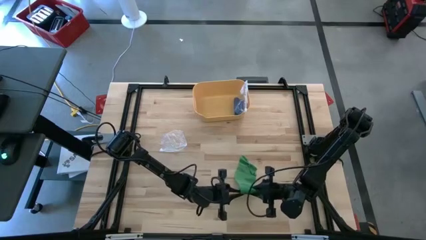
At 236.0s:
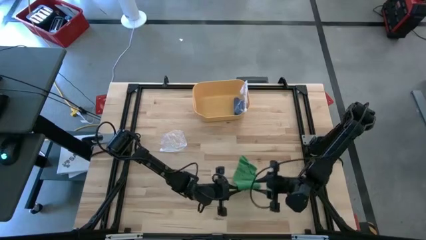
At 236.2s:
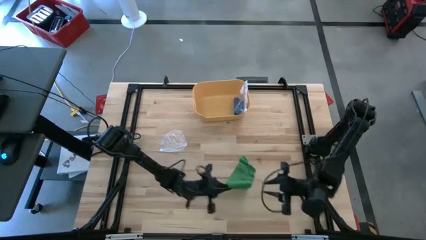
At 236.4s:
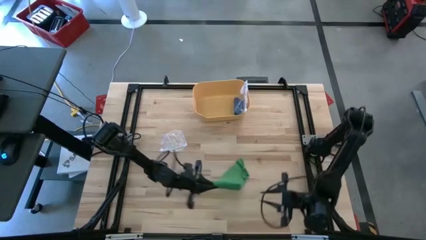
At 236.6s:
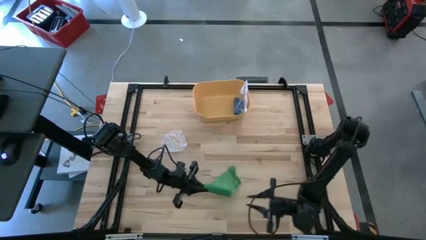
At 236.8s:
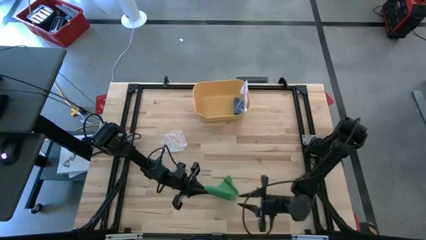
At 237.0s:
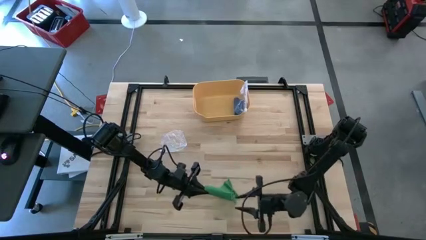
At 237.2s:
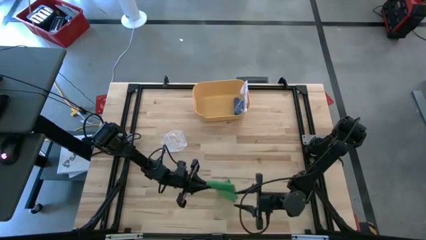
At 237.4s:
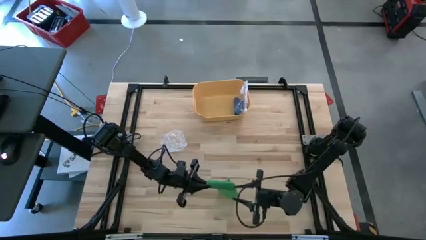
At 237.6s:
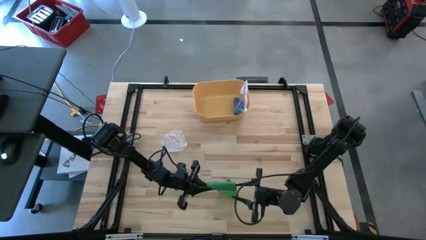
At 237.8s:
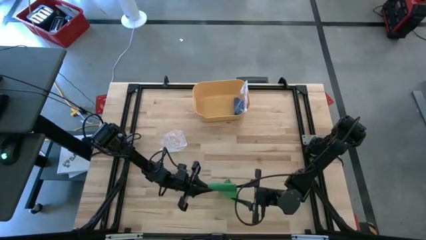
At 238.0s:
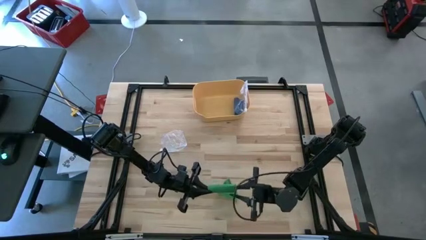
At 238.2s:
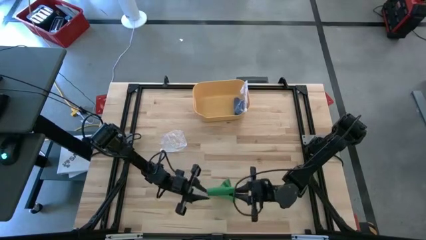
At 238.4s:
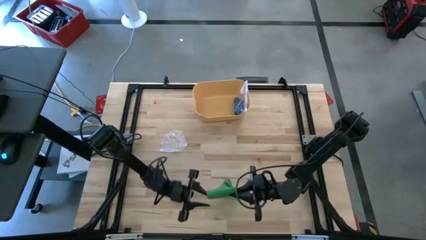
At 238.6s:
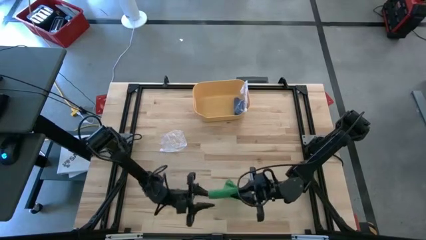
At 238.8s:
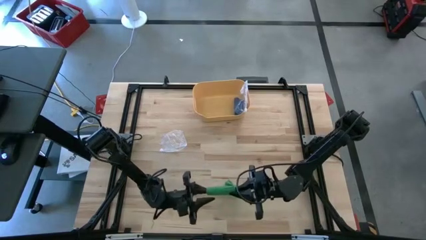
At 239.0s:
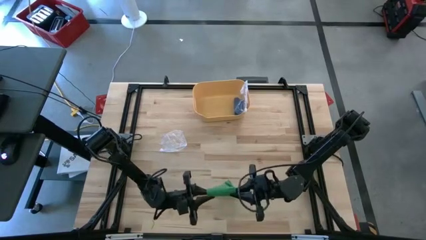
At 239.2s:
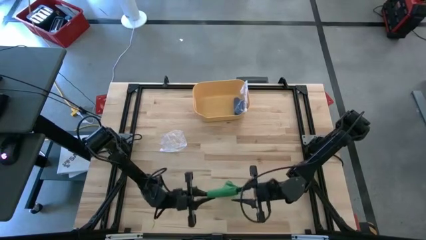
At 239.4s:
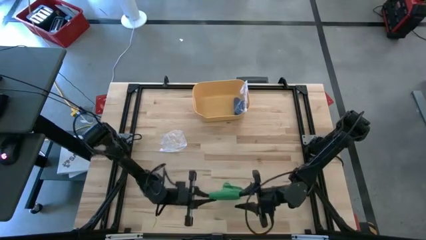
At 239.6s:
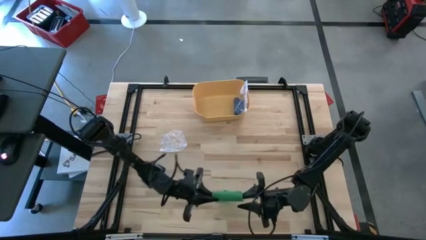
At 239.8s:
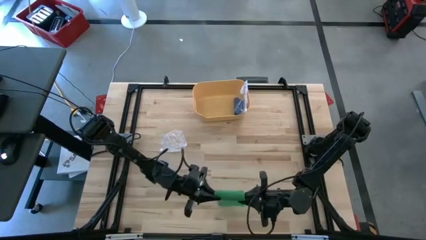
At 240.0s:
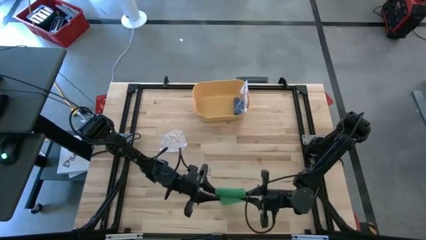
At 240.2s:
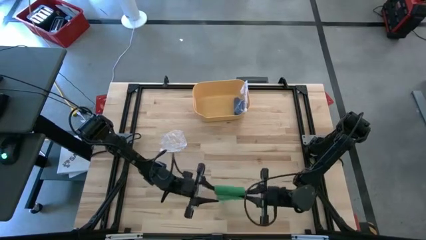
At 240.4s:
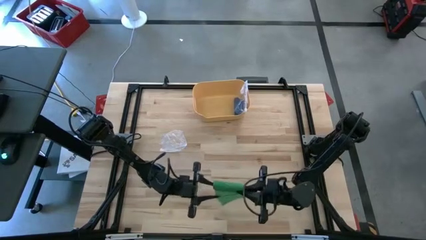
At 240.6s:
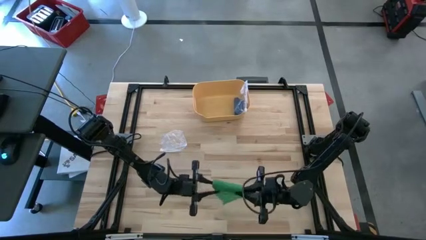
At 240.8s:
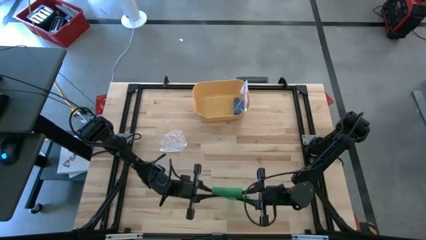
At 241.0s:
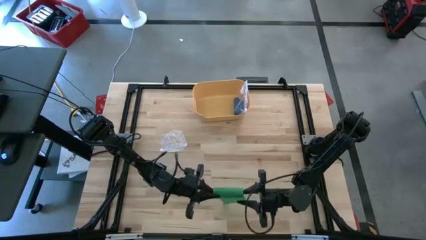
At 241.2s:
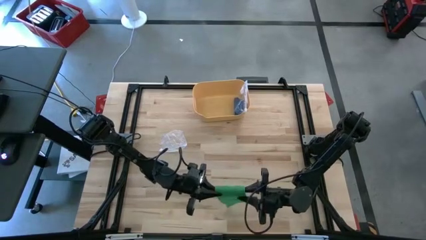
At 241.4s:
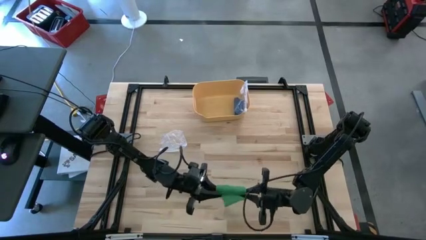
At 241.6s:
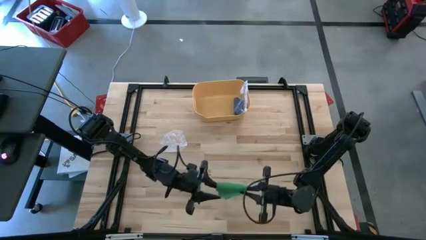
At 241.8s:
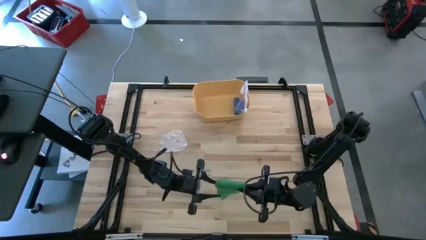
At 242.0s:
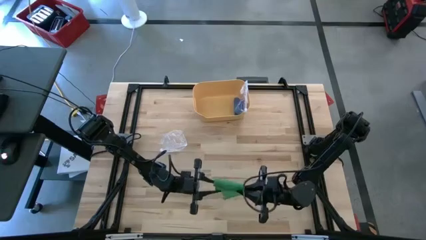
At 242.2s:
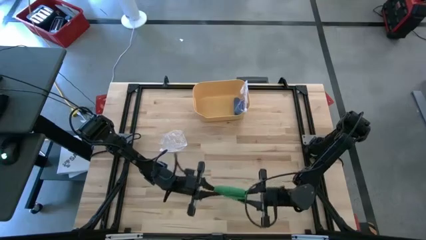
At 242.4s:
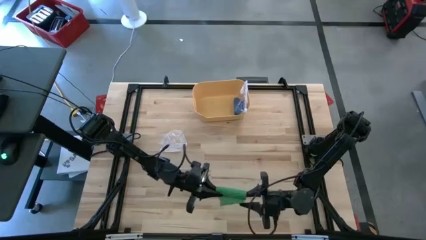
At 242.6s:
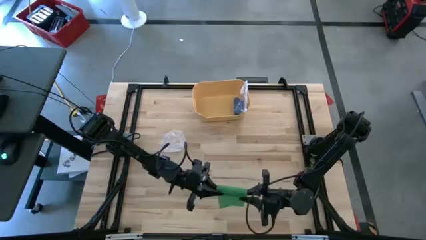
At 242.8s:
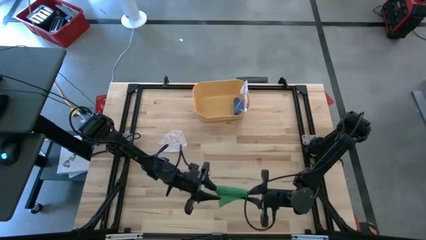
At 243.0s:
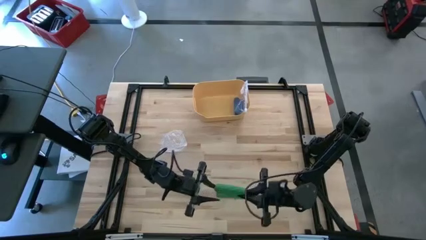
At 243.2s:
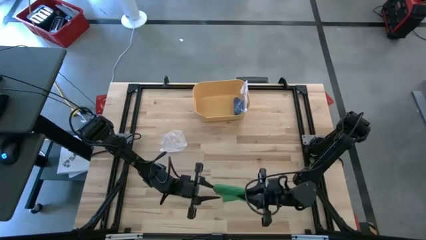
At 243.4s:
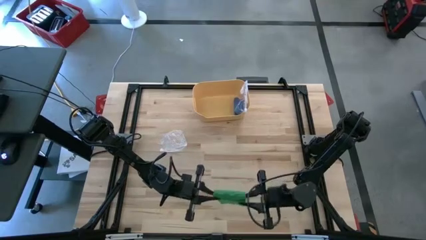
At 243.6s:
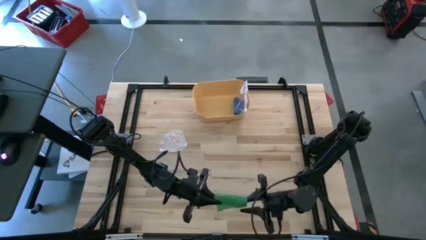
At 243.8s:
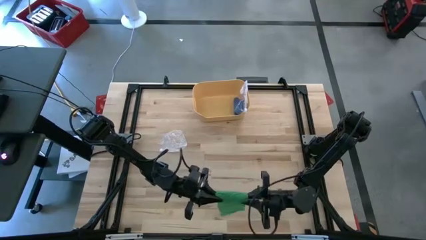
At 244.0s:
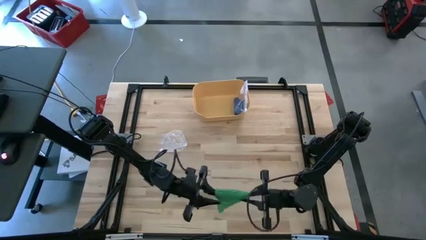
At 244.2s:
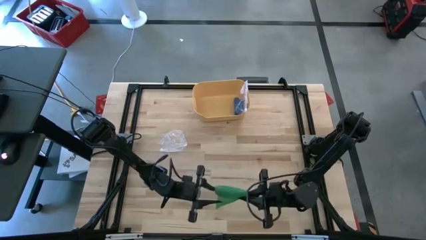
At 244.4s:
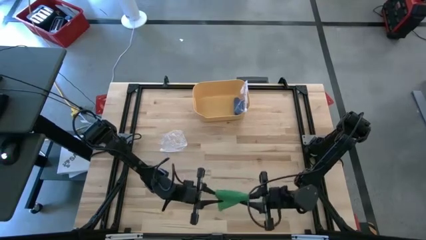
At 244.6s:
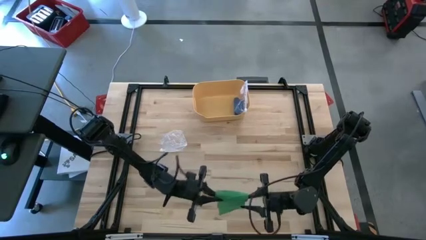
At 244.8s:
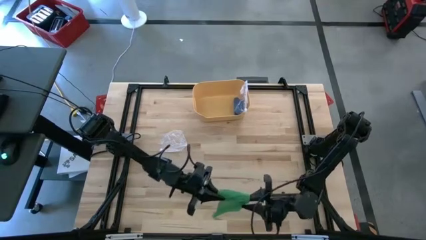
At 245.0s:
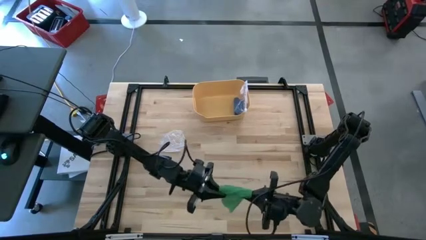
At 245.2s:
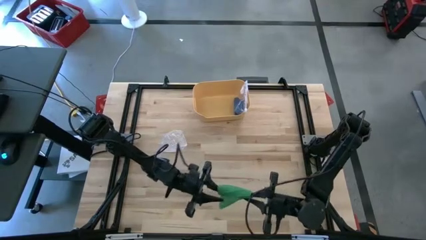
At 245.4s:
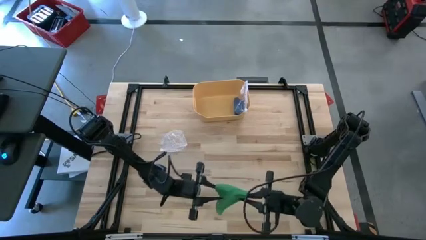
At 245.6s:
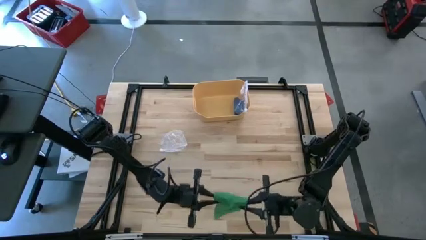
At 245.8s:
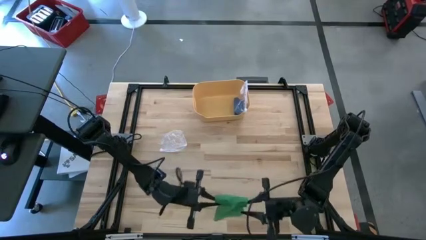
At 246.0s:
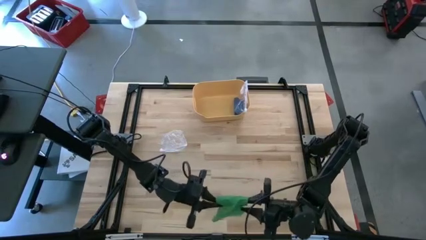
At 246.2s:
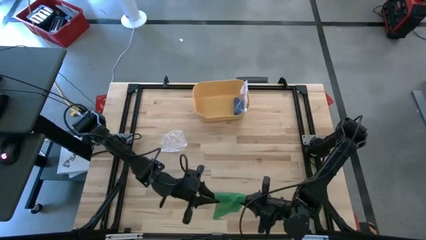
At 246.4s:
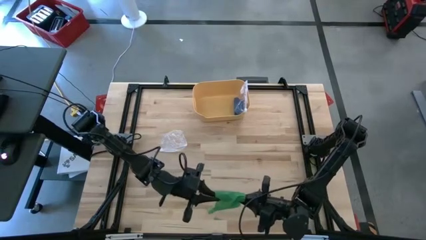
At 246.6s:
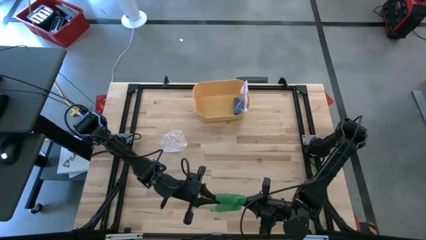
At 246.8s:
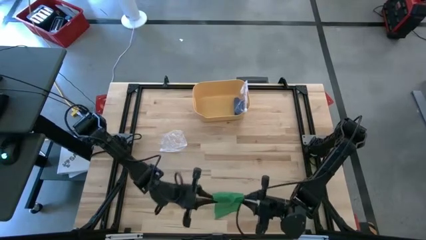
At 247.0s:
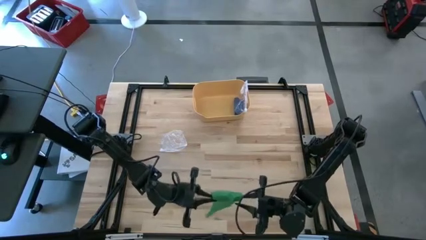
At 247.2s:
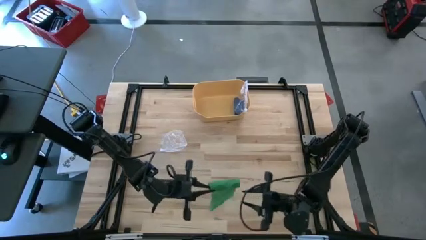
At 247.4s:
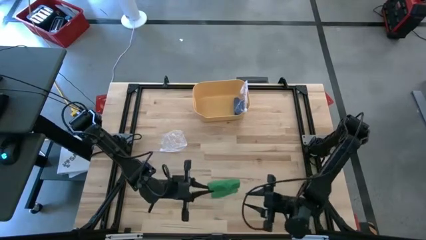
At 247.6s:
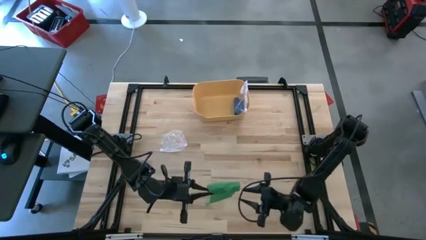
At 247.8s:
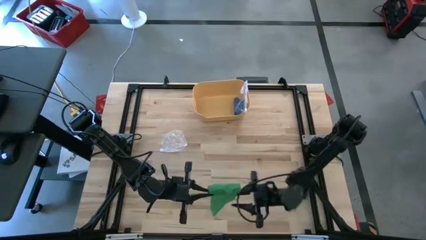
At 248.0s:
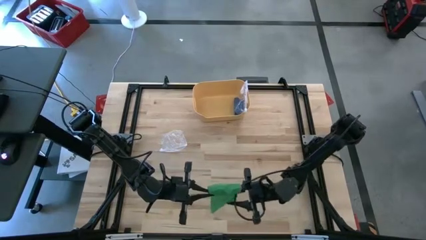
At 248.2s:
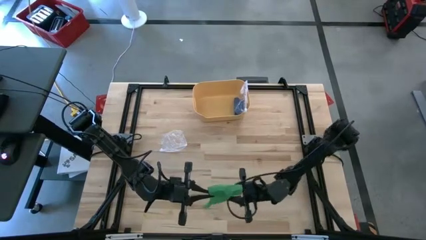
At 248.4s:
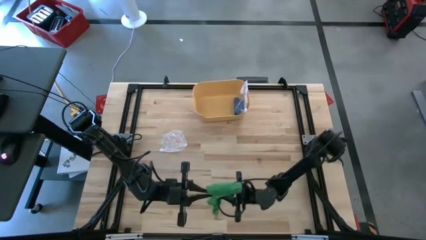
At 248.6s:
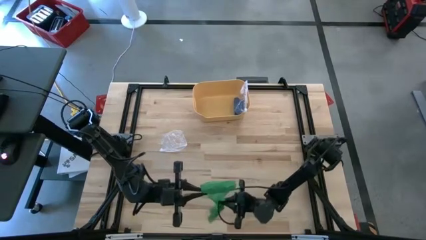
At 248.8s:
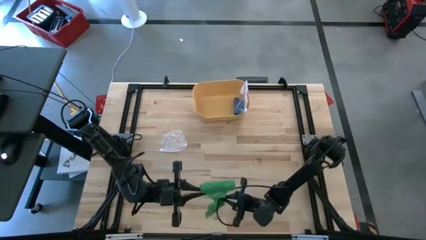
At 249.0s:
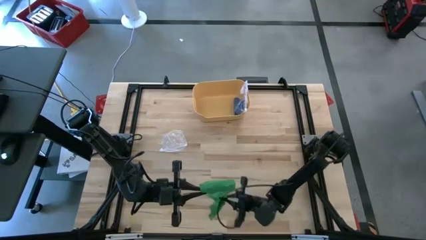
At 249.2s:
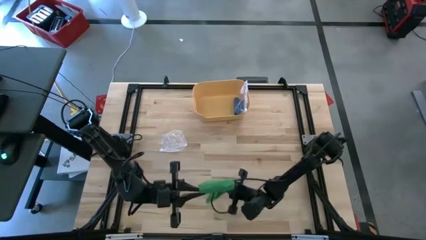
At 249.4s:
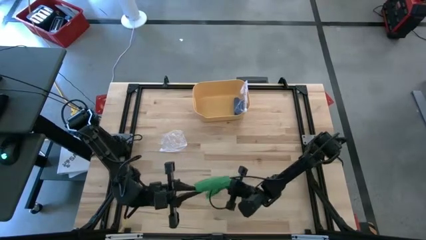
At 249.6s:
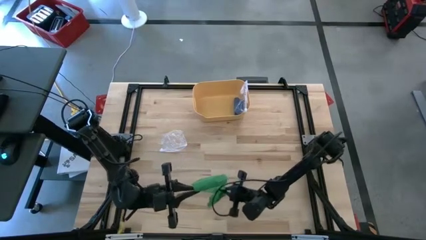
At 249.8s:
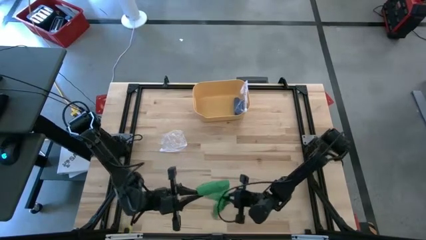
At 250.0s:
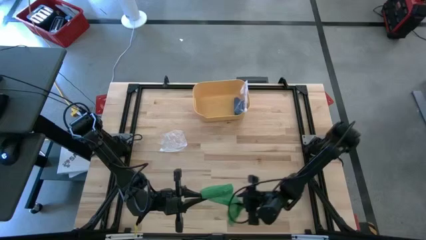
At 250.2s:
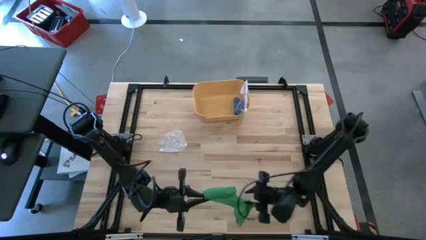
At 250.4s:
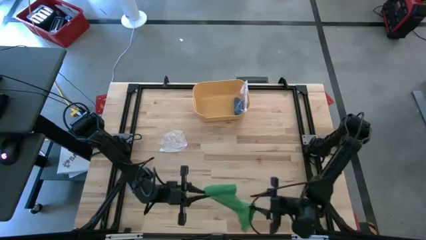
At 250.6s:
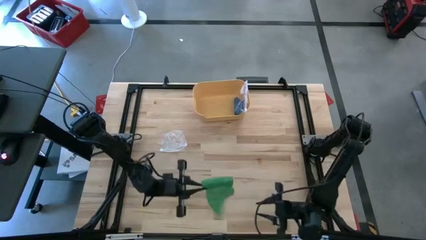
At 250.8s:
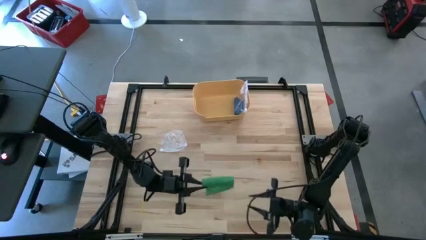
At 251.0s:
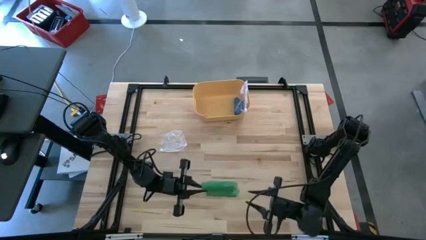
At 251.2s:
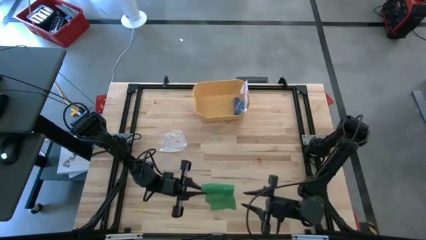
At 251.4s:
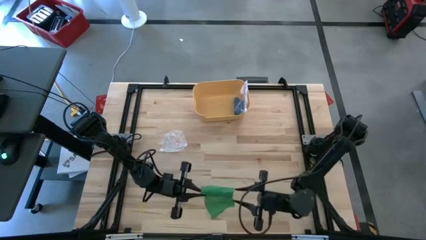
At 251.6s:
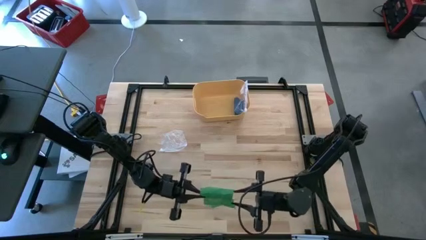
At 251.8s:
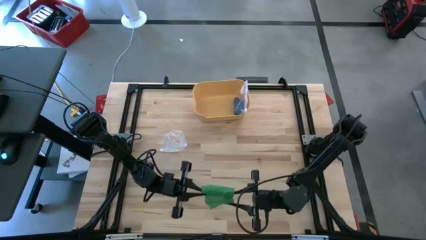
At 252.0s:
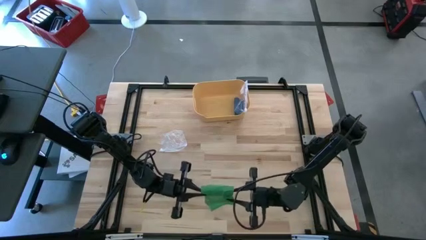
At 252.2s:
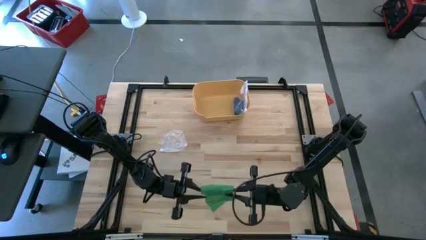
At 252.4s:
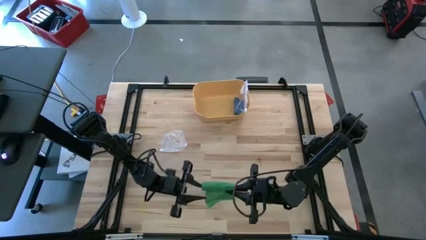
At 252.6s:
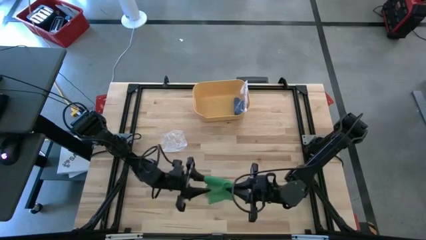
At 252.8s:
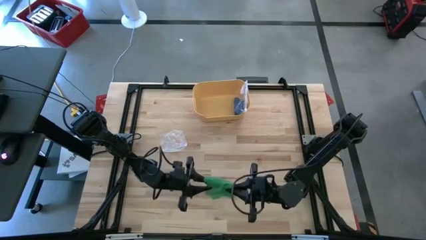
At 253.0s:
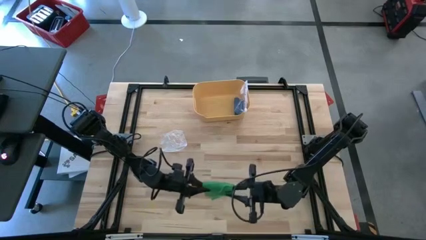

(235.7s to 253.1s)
Task: Roll bandage
Roll the green bandage
